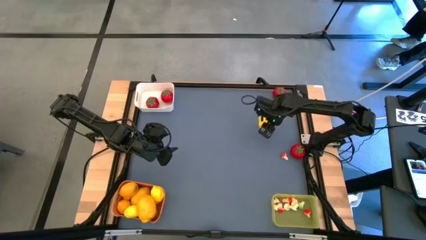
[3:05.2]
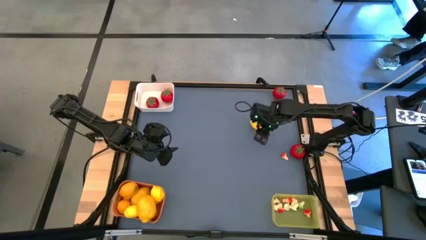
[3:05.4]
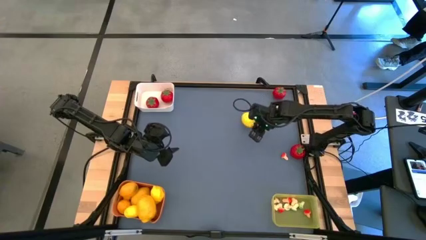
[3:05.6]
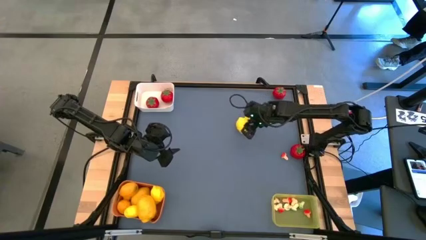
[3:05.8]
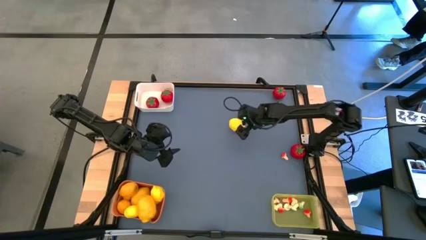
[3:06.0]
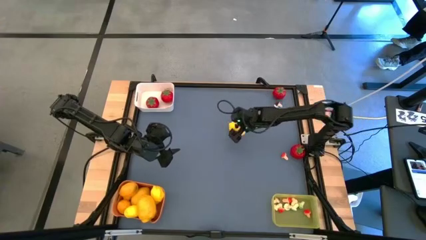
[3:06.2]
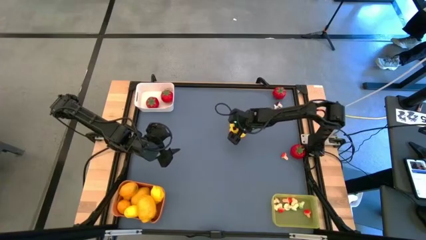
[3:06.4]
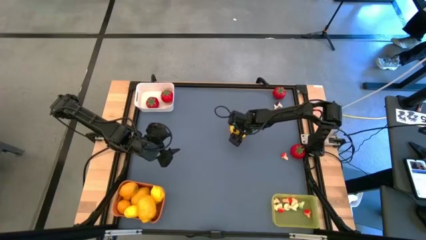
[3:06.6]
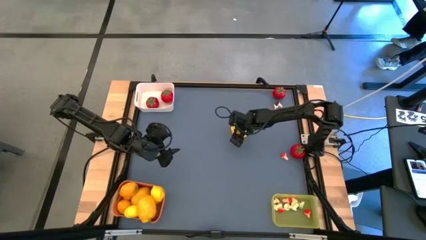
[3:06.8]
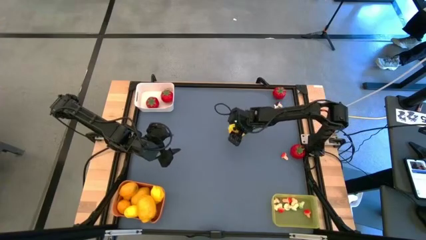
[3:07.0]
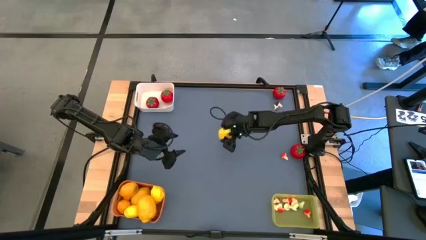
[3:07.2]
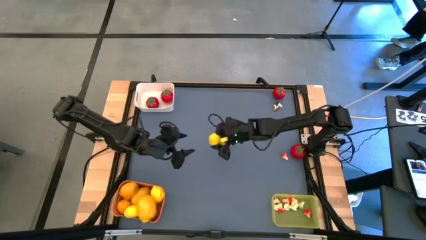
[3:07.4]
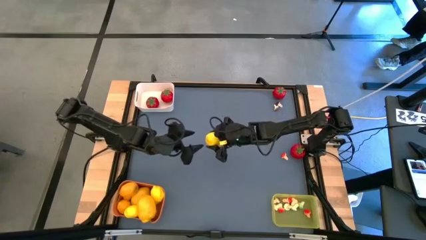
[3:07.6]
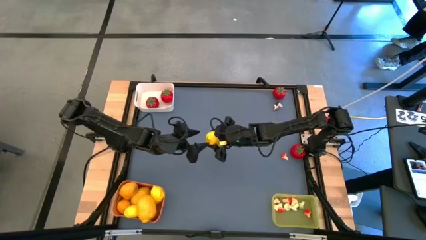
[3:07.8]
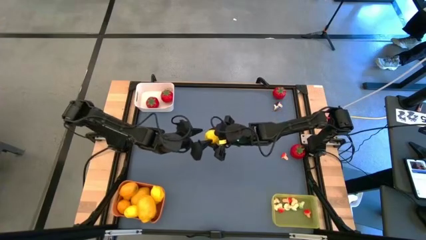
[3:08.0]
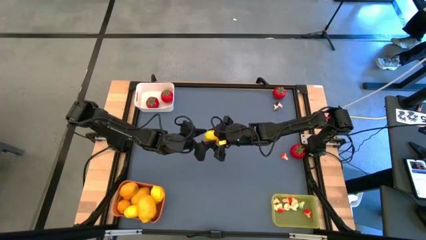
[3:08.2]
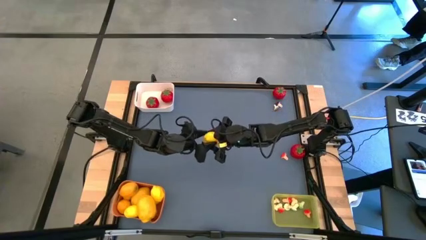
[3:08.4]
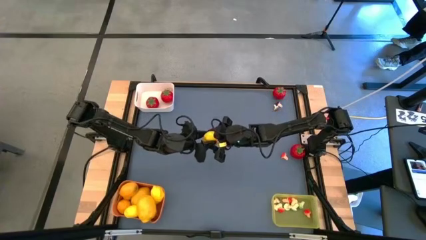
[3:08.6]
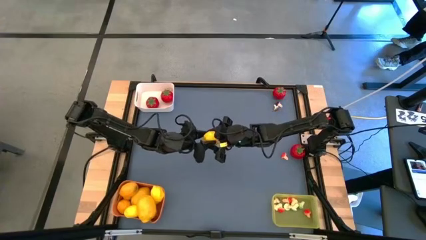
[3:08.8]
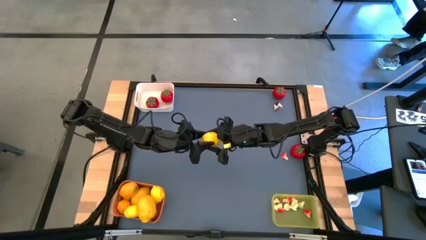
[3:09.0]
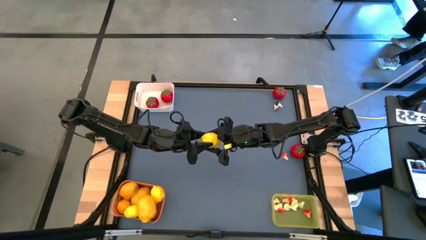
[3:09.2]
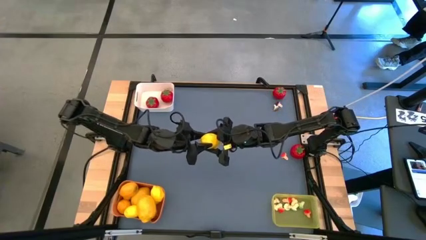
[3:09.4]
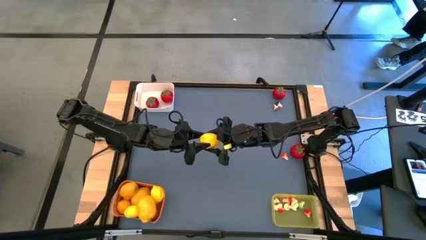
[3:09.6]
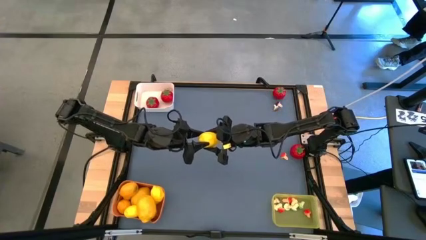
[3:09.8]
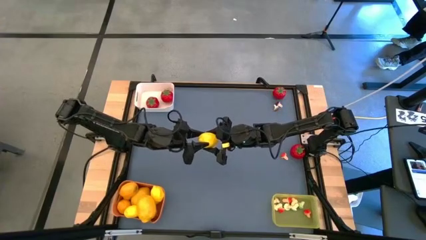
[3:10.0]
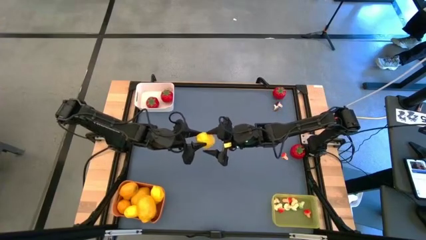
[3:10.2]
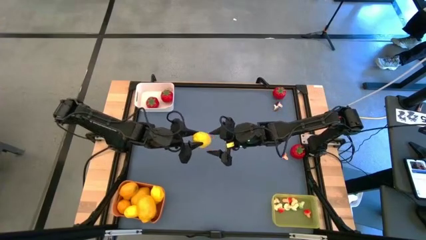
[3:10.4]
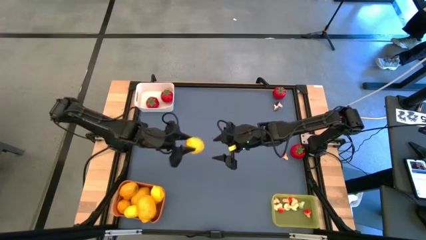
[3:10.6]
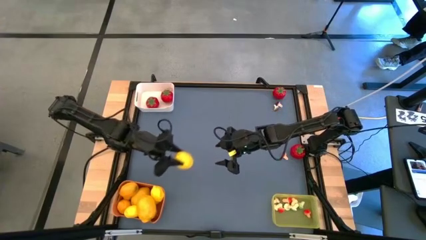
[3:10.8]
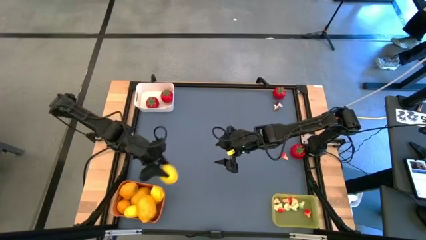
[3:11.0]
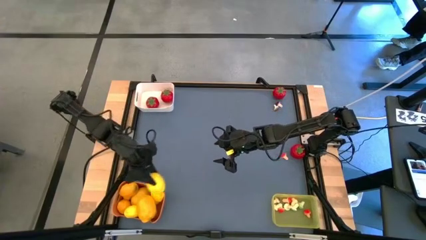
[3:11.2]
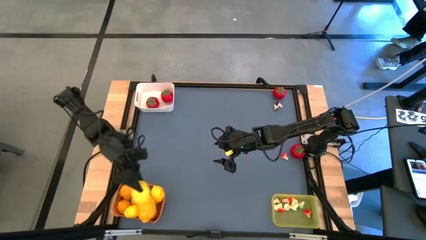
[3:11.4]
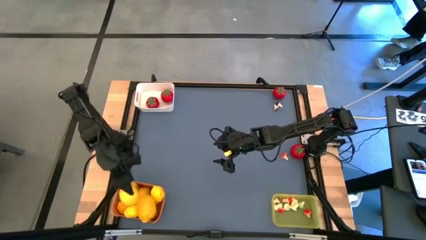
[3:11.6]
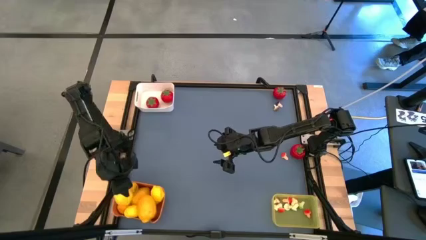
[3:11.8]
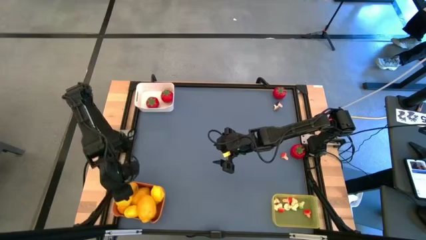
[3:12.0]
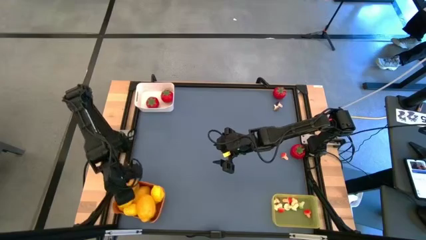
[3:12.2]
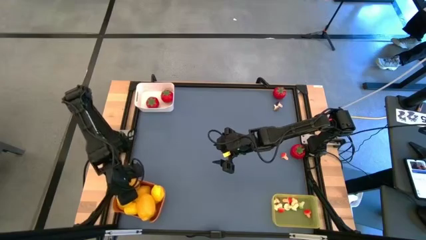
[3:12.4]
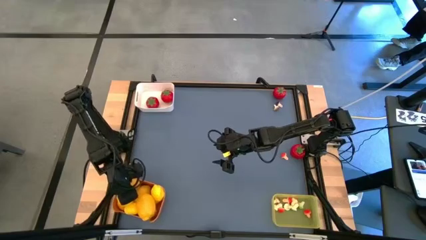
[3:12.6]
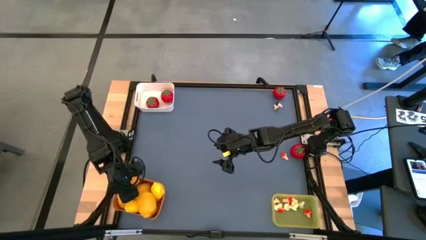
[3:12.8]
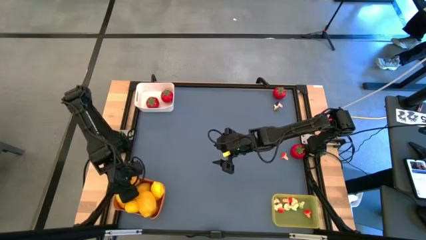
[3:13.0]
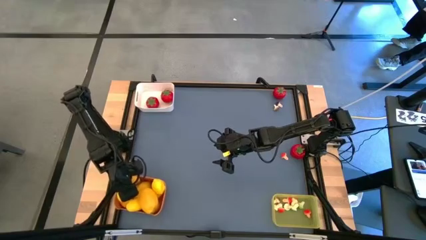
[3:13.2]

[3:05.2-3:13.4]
Task: Sort produce into baskets
Put the yellow lemon into the orange bin

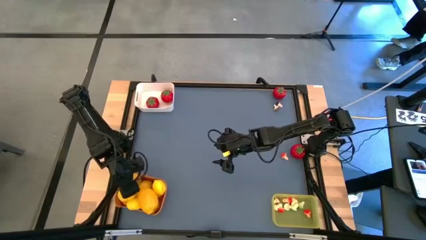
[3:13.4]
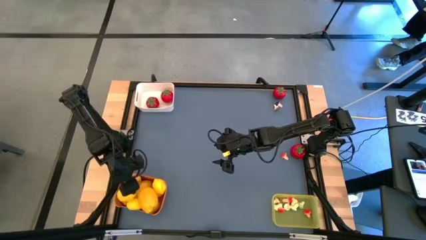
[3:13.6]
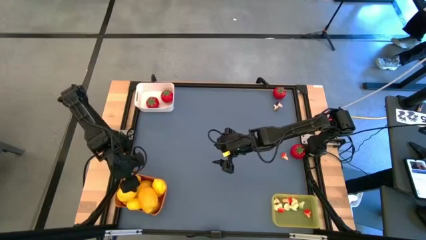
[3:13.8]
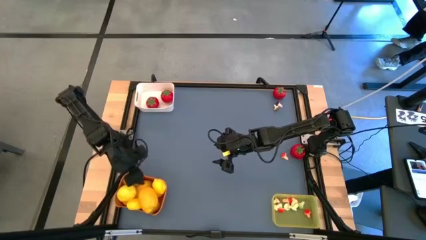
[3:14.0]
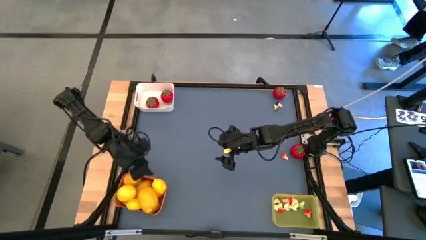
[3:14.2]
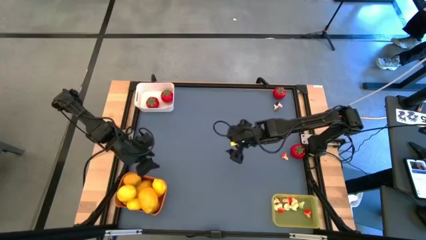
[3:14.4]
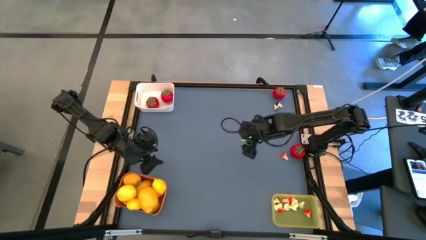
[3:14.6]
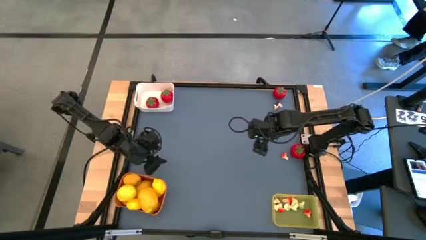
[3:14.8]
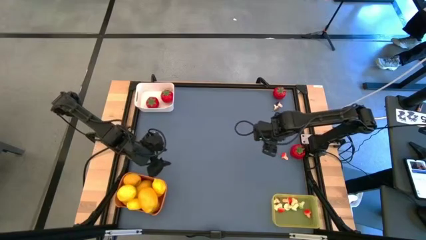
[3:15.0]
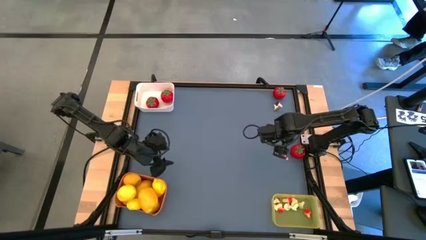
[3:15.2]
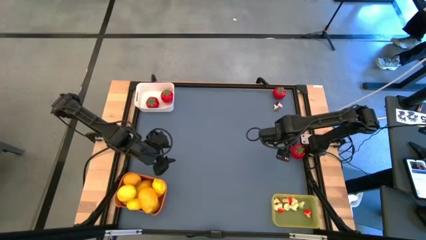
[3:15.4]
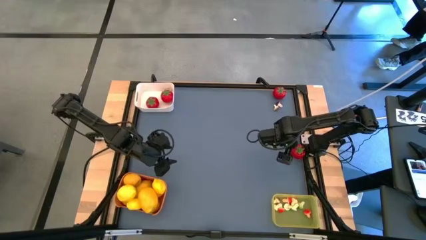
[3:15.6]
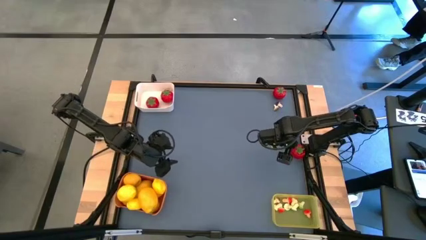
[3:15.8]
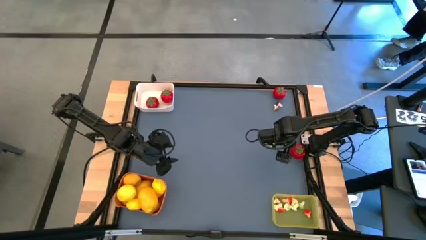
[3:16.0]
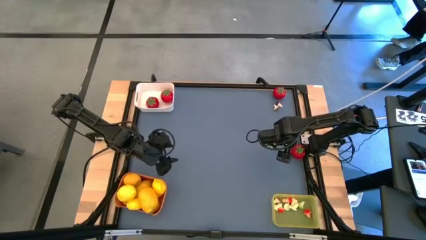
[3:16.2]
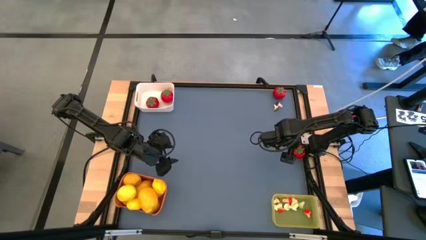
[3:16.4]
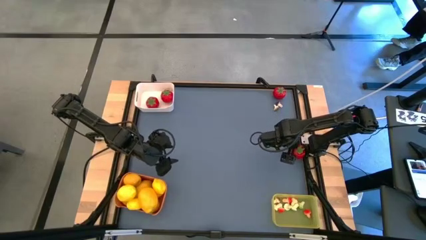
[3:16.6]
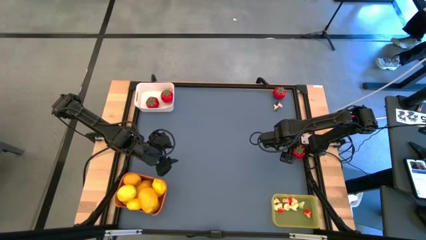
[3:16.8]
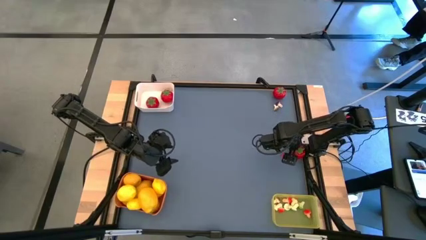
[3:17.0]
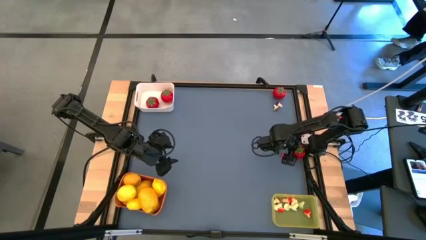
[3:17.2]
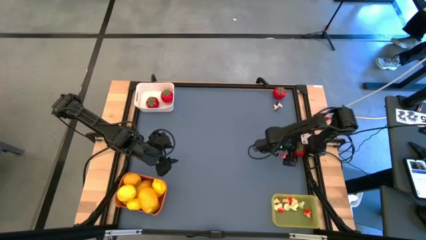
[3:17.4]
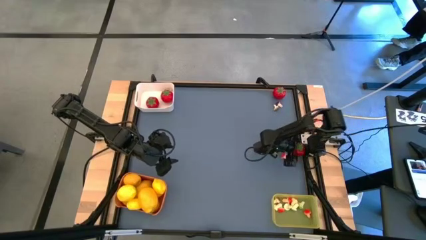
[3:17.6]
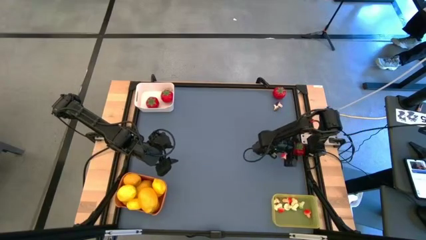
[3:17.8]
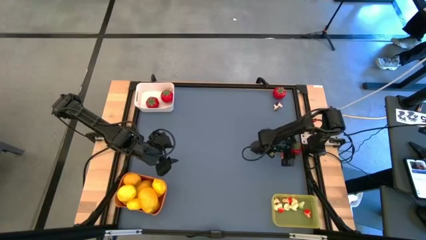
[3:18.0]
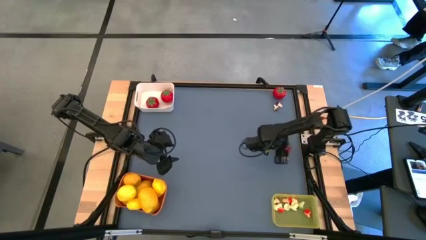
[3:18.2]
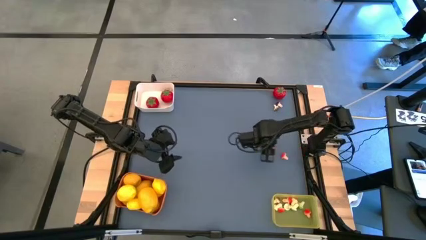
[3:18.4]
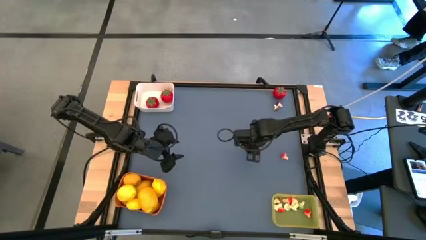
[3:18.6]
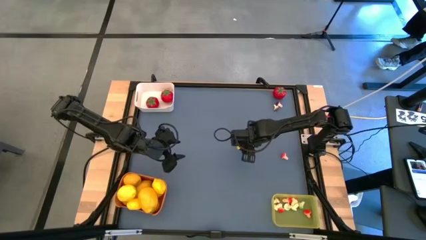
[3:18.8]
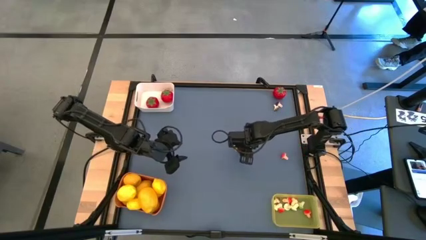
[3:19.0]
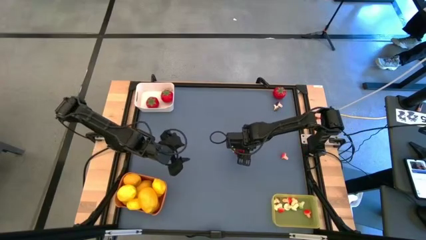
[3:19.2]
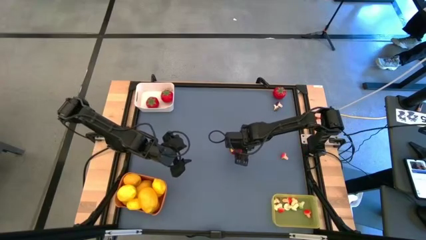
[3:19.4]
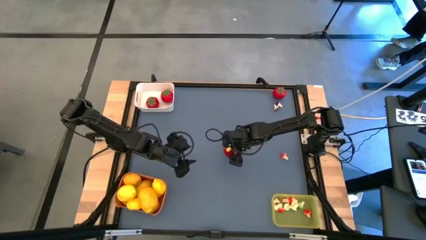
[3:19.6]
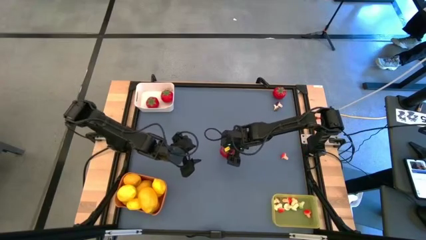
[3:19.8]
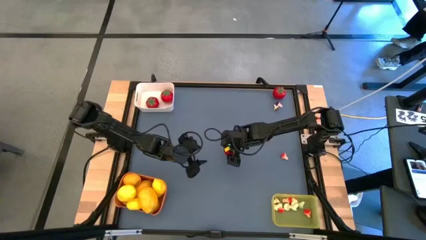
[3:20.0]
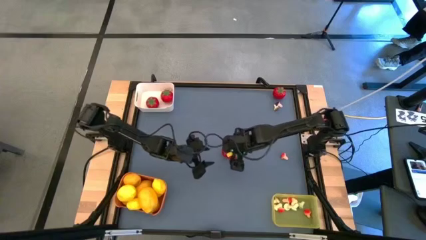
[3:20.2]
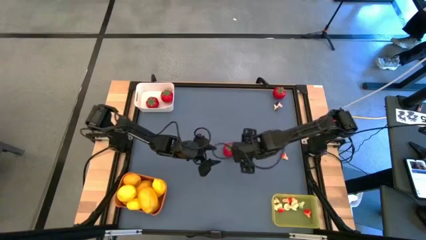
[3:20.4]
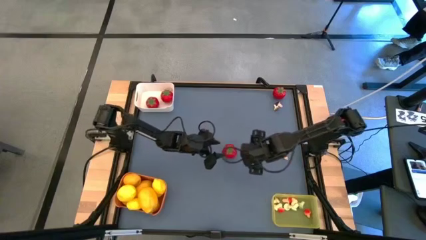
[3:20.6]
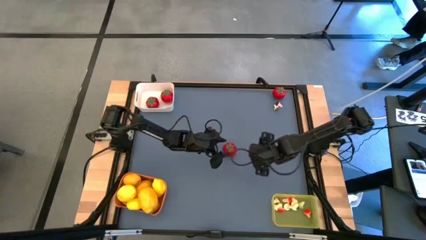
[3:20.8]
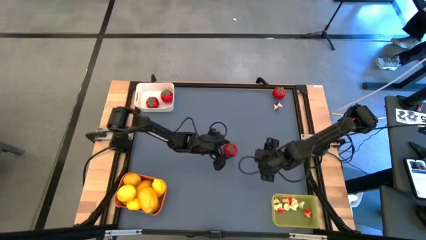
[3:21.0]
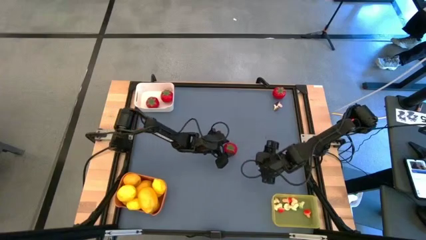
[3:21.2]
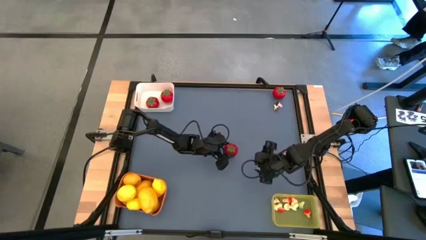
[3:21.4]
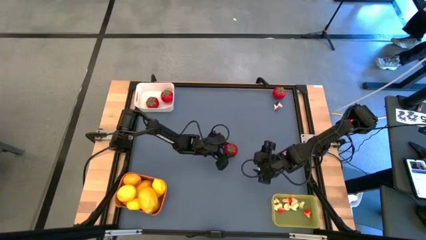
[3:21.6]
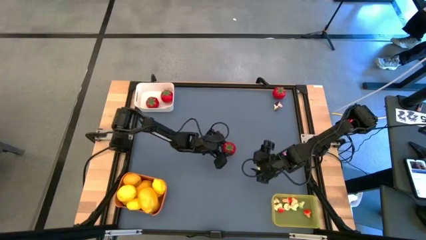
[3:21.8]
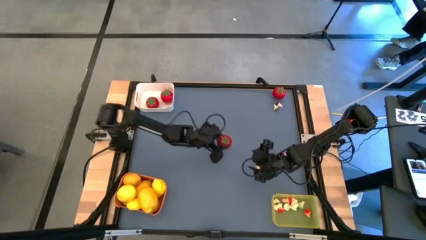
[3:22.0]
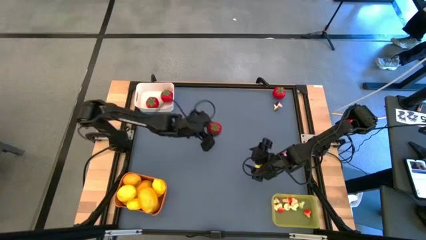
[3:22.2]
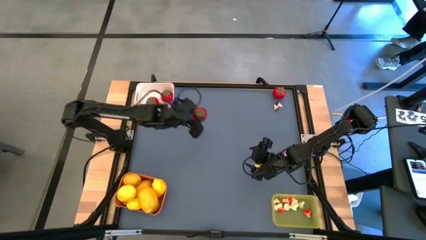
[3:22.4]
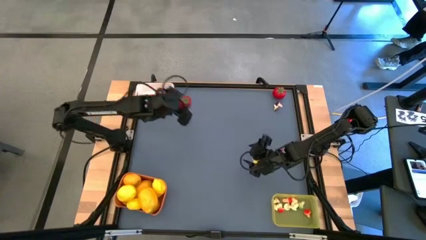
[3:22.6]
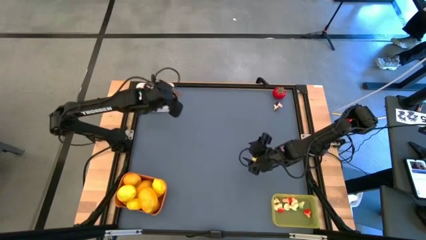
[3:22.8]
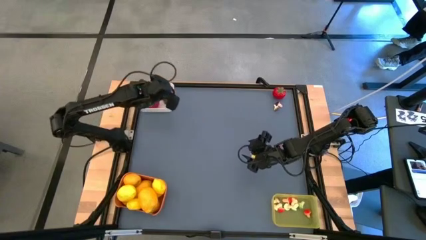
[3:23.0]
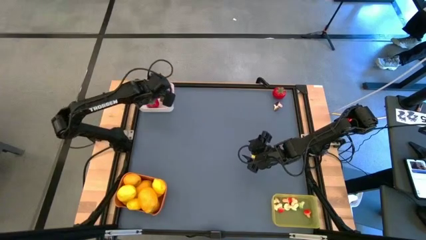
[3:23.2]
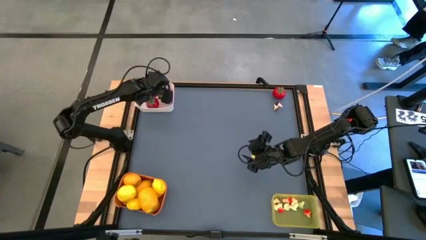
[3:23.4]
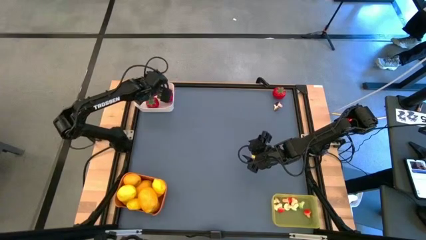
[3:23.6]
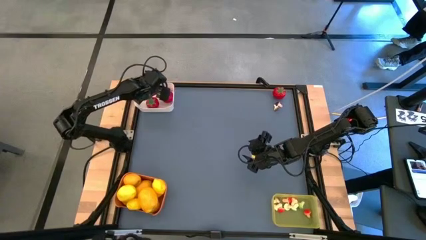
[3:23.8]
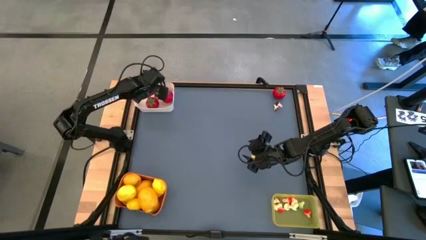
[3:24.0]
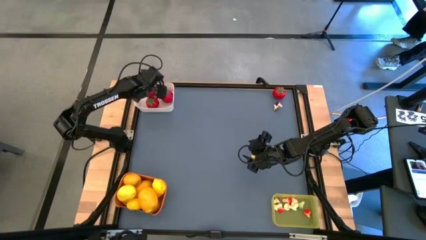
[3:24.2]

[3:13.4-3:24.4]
Put the red tomato into the white bin
